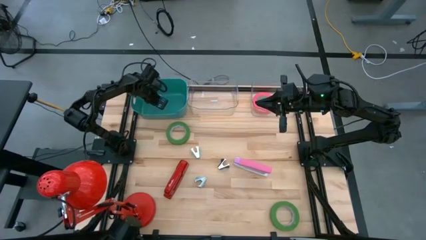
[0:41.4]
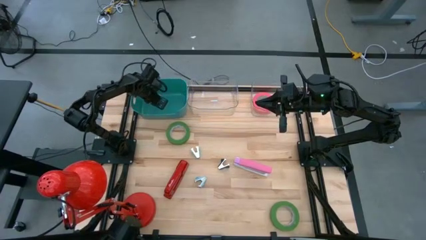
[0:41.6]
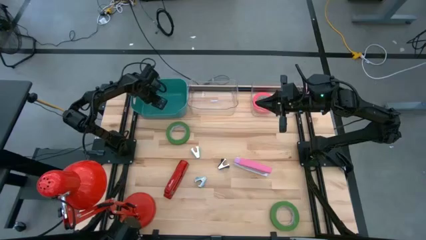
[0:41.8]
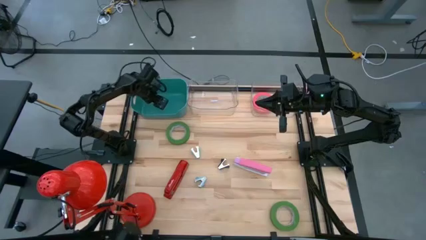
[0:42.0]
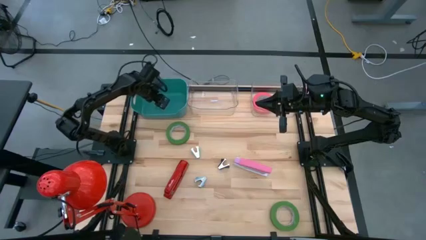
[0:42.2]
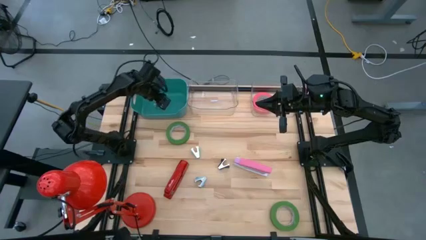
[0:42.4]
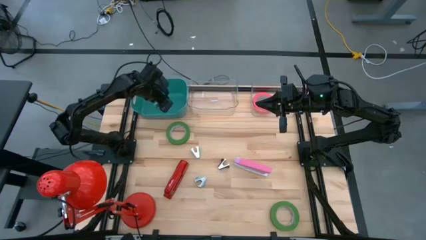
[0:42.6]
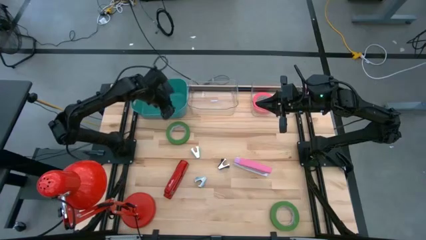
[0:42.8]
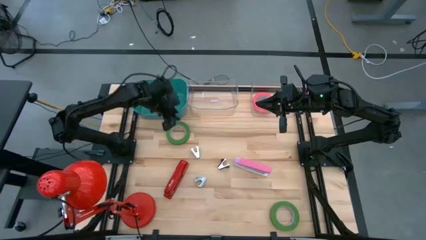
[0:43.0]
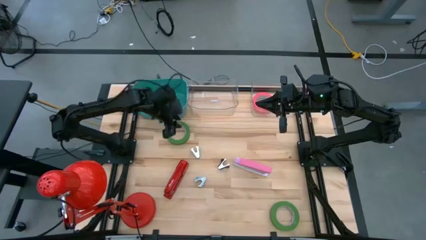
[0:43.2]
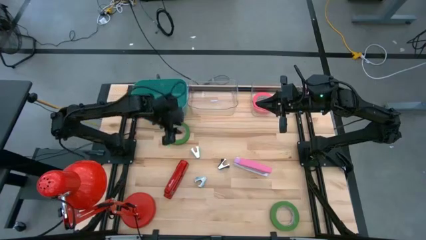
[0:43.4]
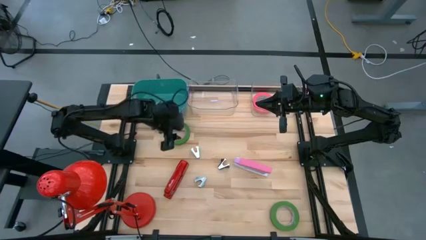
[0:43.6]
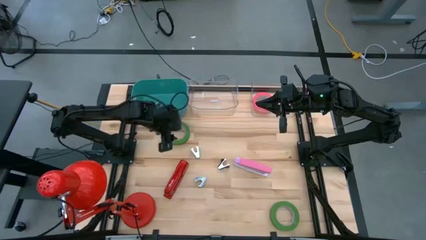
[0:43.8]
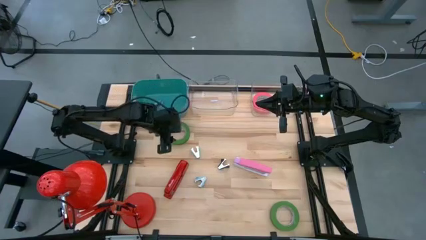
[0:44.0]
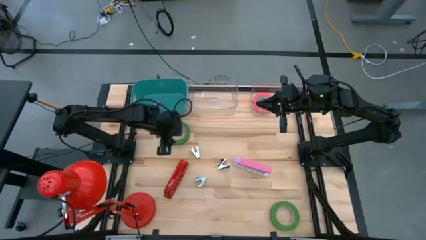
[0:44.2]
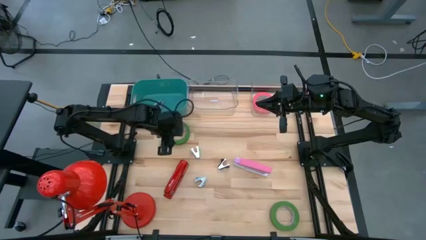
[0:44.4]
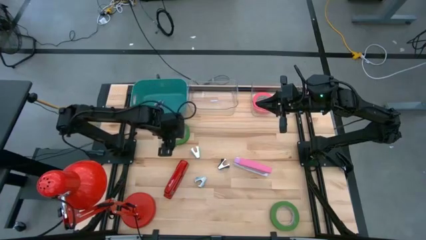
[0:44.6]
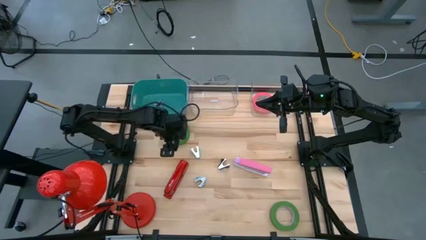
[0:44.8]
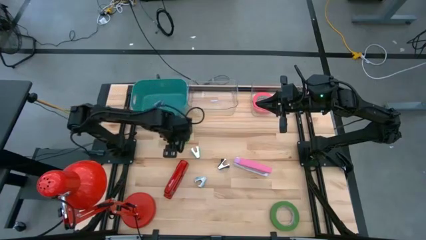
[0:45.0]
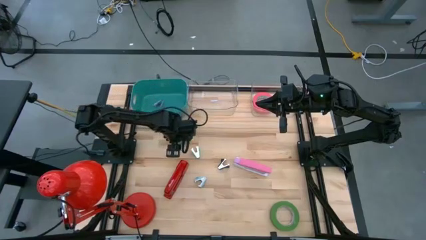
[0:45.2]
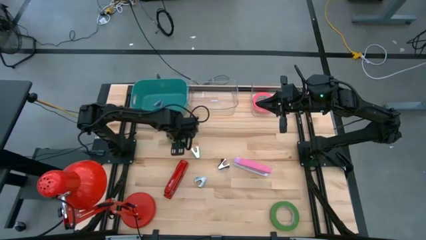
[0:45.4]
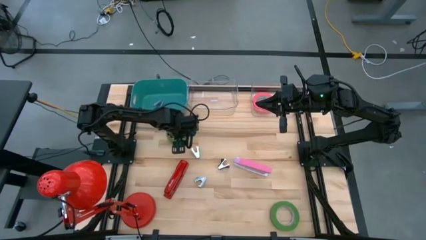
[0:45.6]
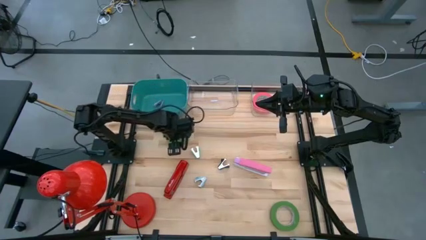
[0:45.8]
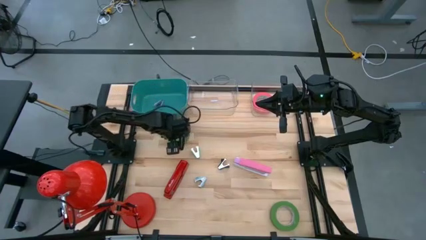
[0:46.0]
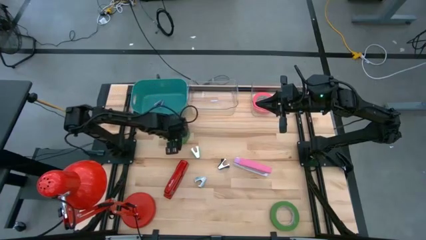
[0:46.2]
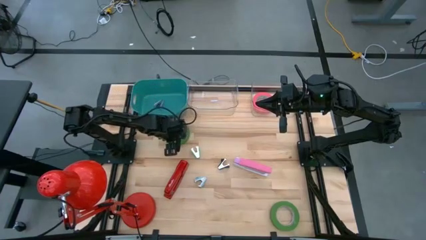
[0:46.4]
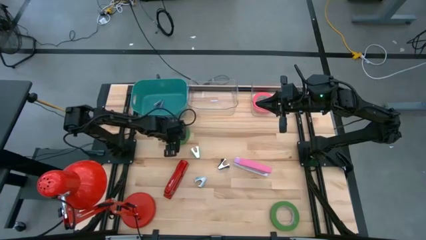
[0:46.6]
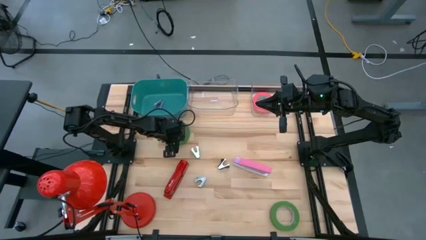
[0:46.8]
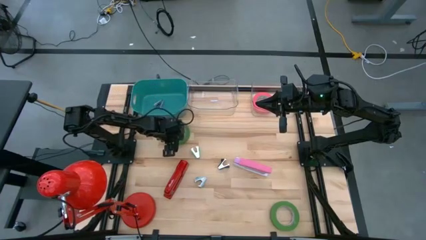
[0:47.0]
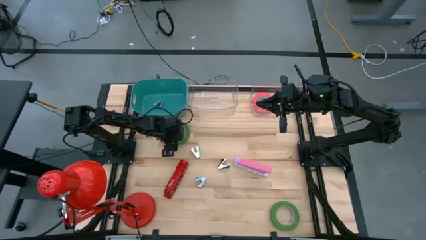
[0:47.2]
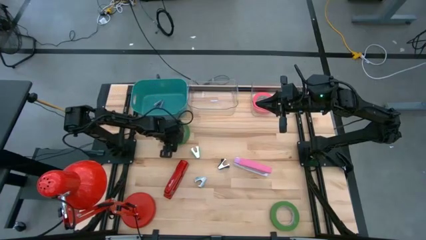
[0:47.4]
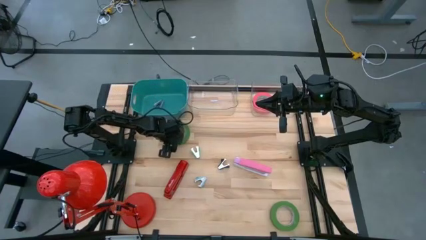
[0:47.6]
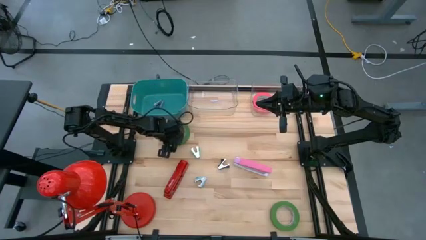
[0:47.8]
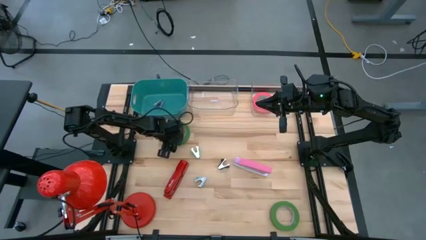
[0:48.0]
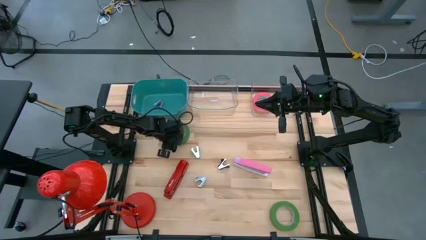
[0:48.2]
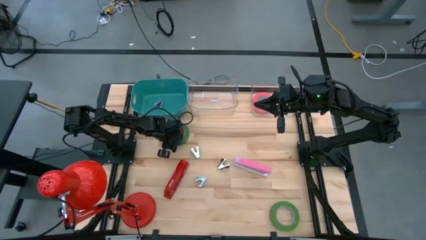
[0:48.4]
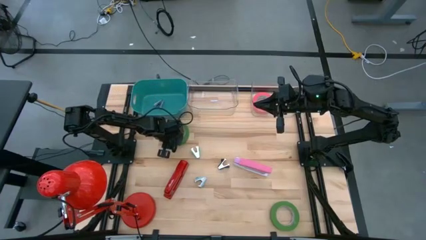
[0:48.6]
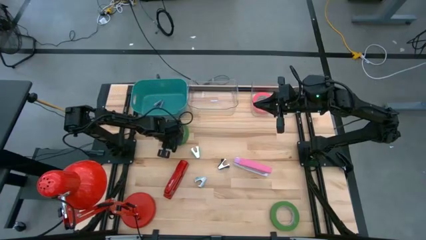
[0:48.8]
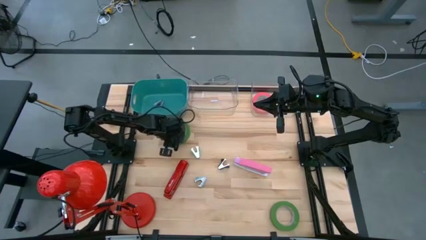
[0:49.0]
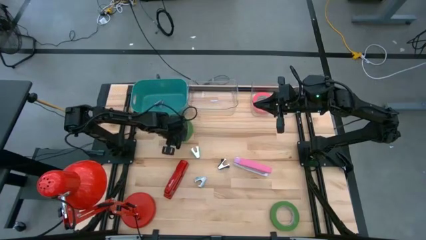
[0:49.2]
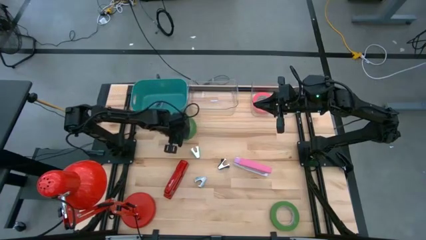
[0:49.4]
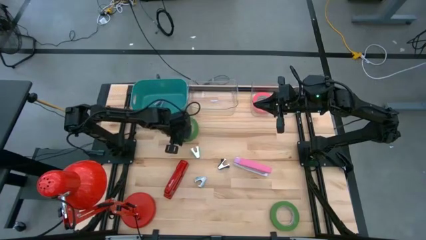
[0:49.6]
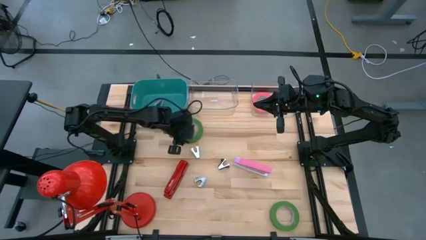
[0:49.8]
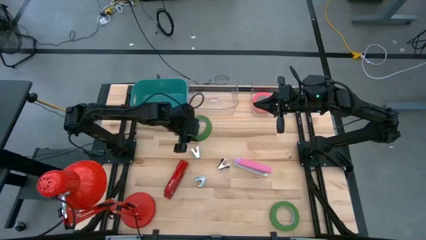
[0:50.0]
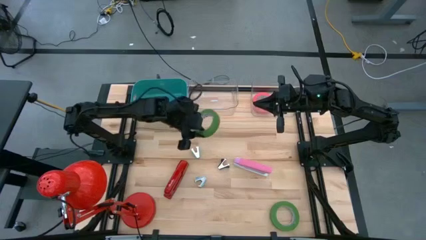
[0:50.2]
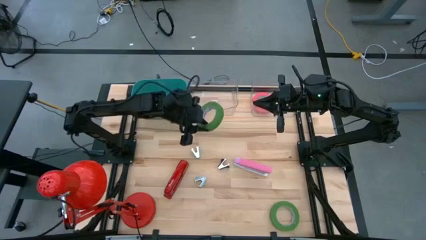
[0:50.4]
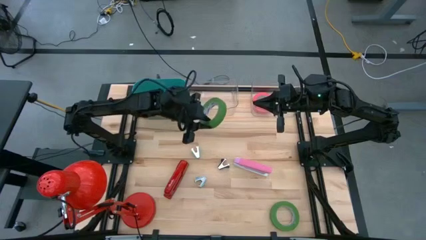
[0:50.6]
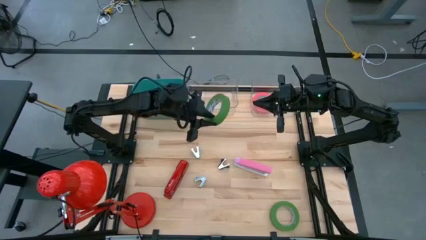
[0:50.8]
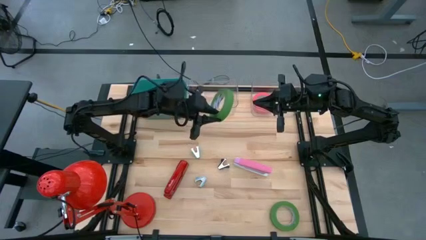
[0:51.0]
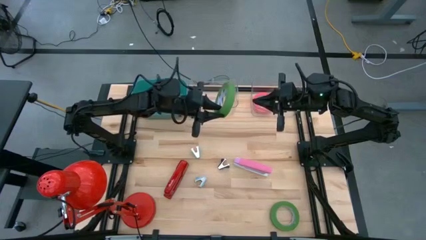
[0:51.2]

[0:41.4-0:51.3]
Task: Pick and place Stapler, Stapler remover, tape
Put the top green tape into the right transparent bin
